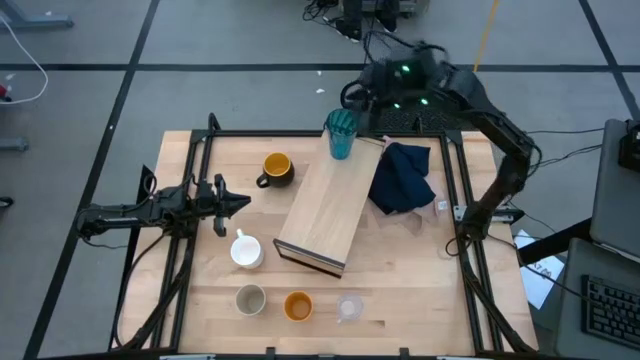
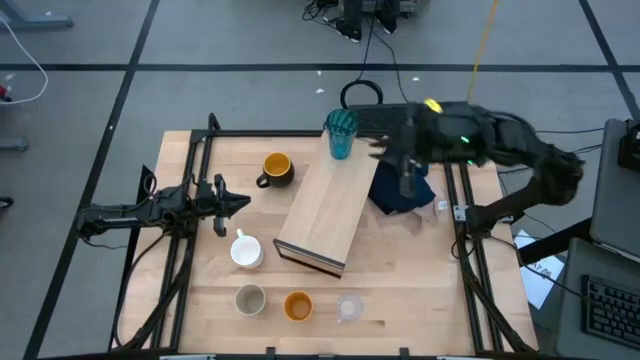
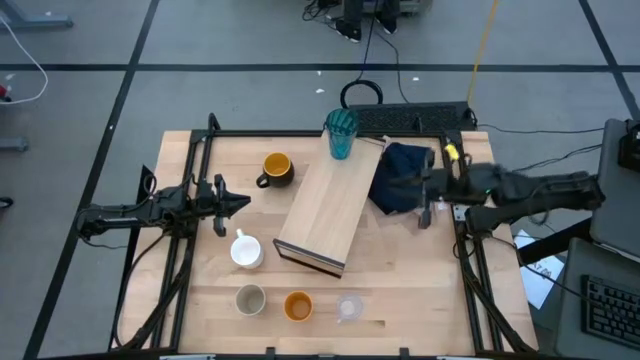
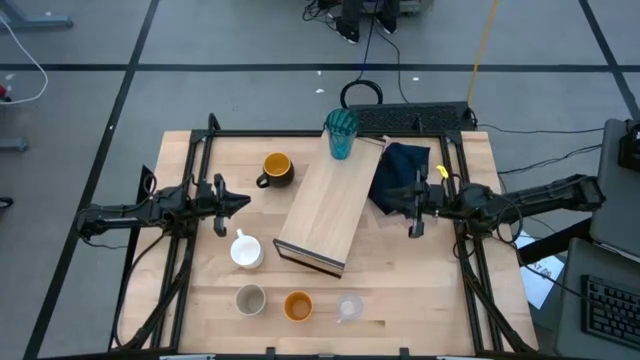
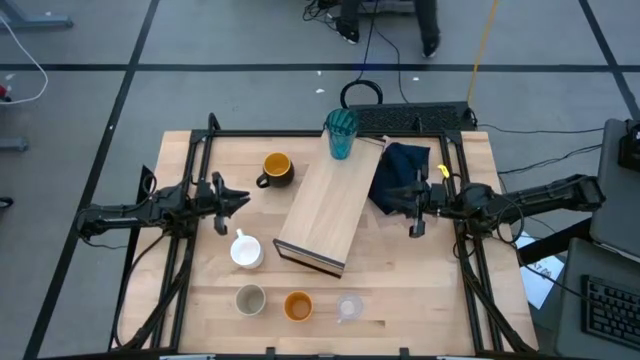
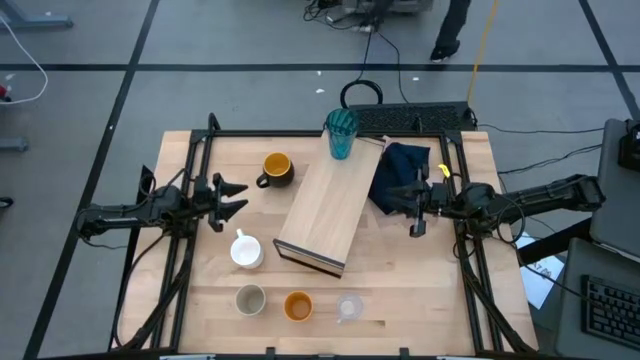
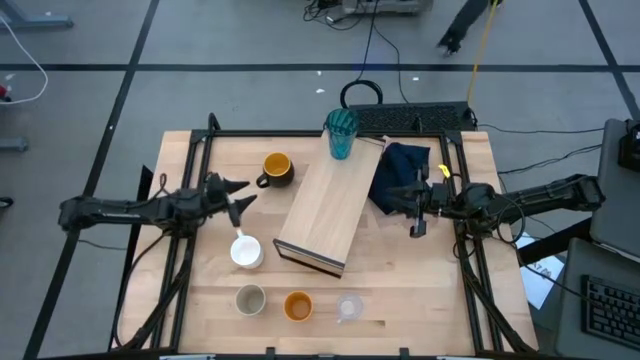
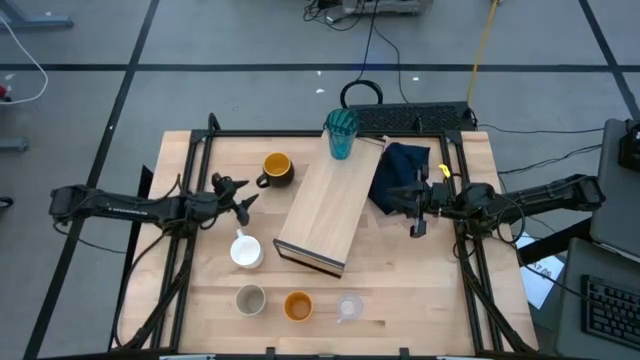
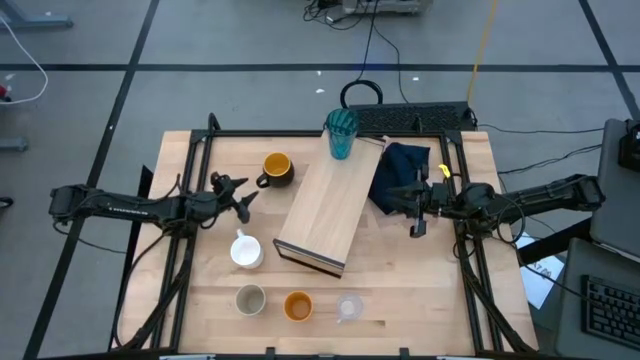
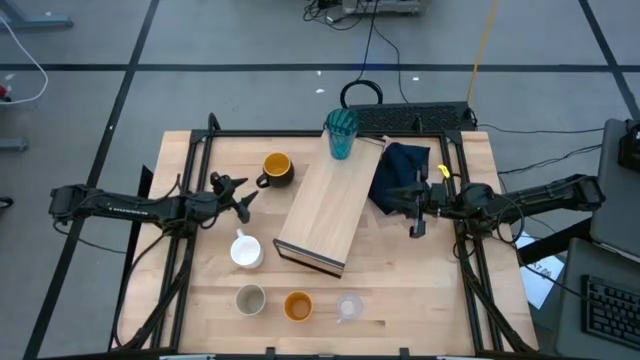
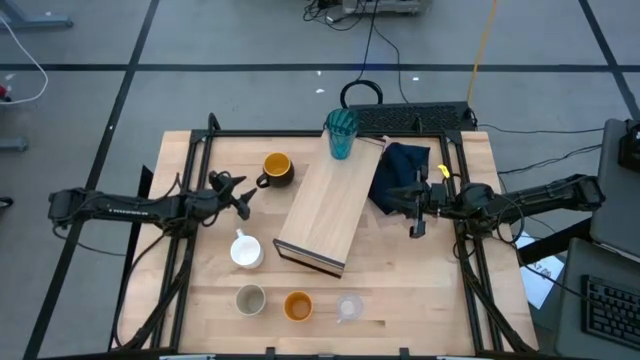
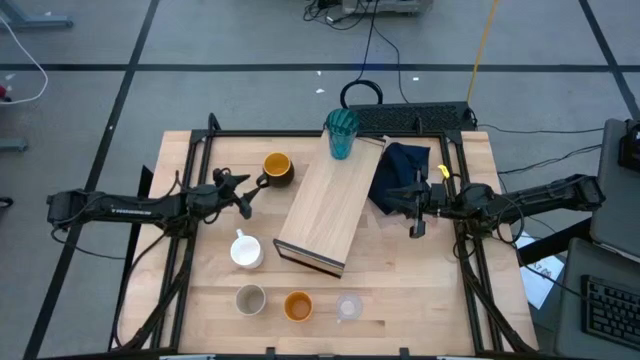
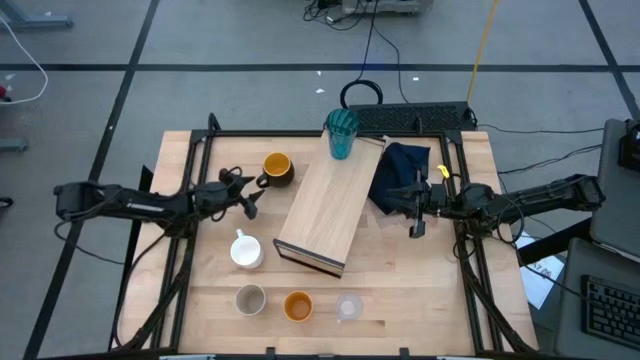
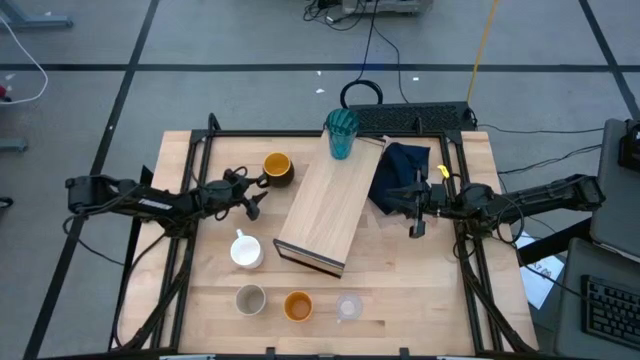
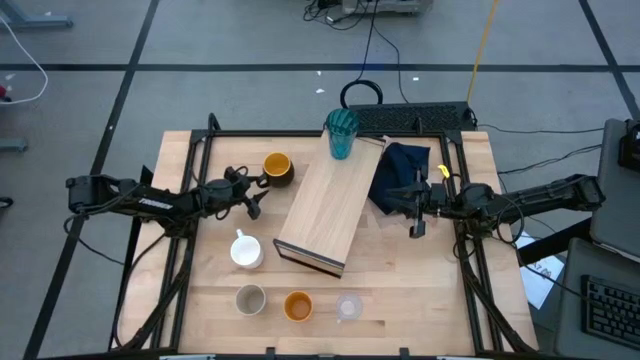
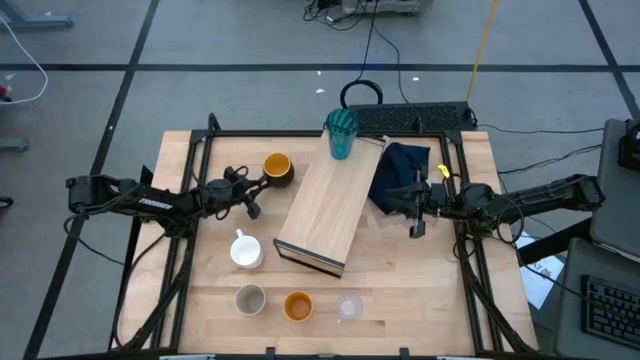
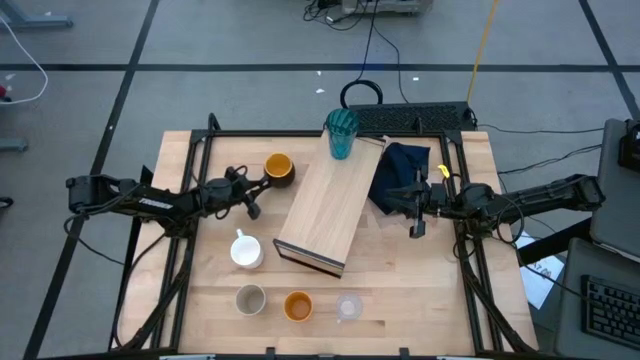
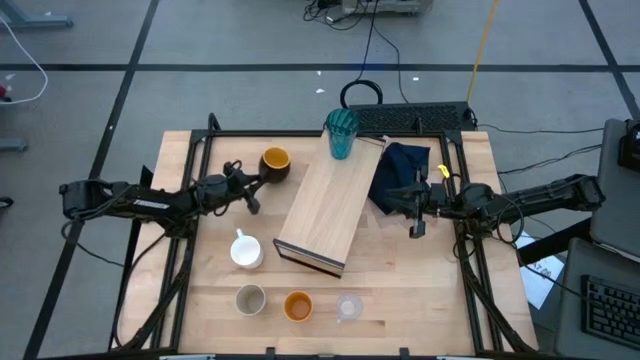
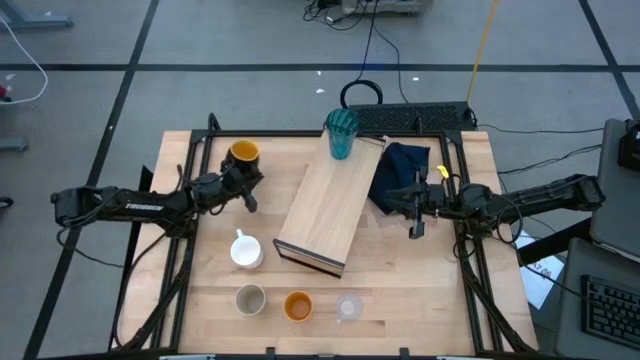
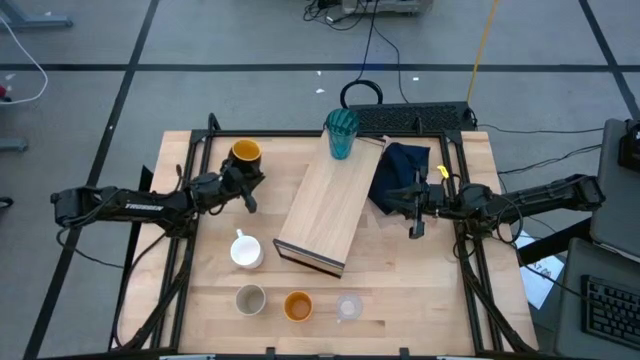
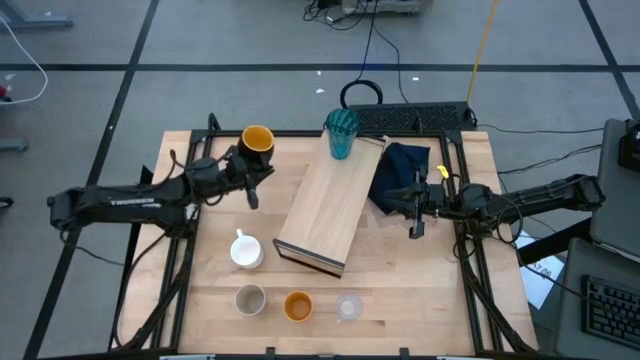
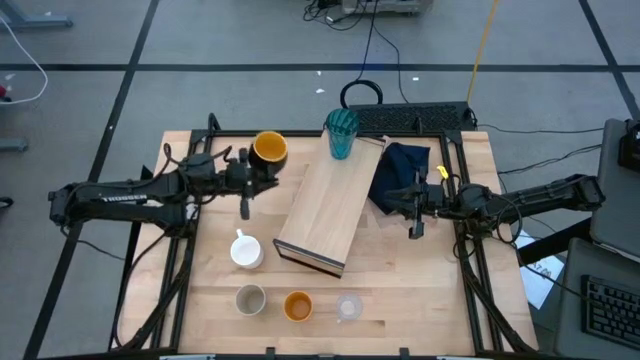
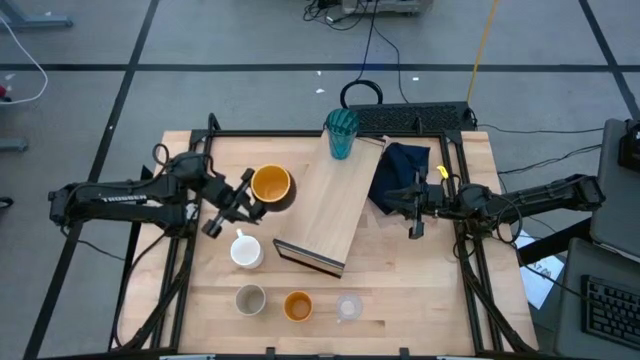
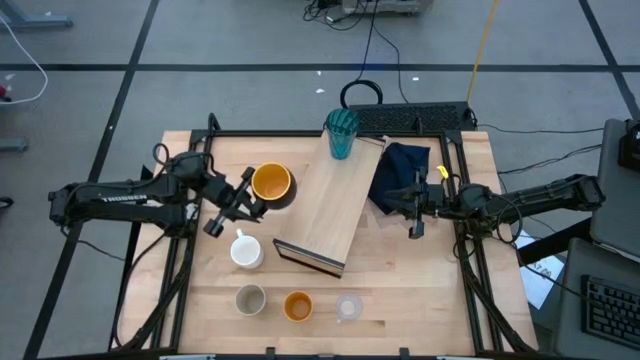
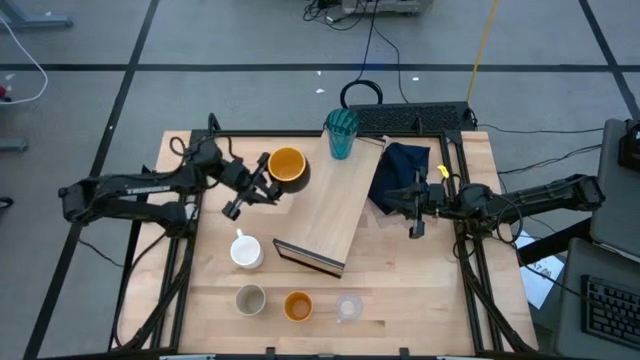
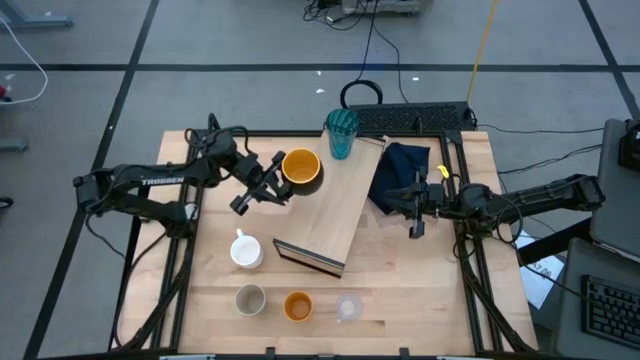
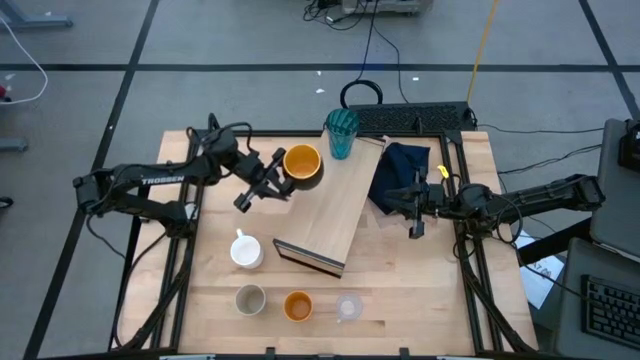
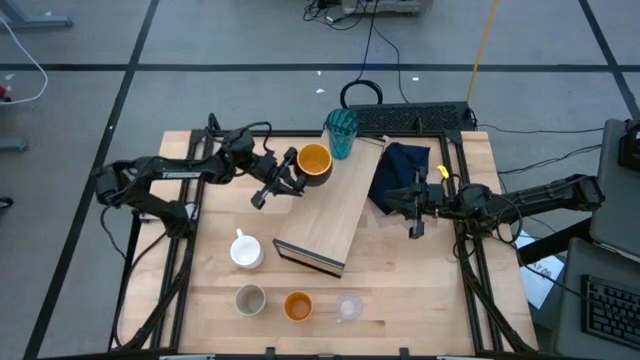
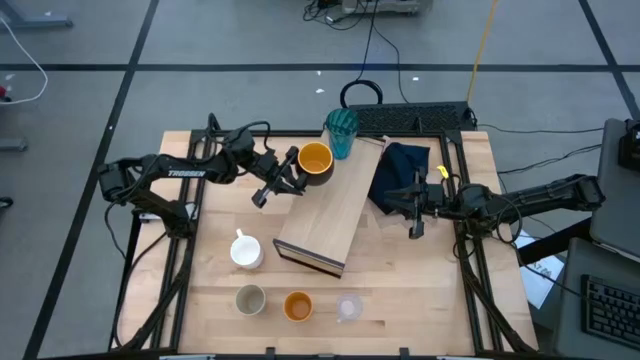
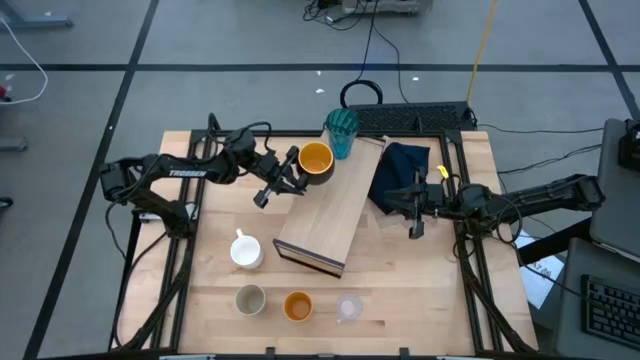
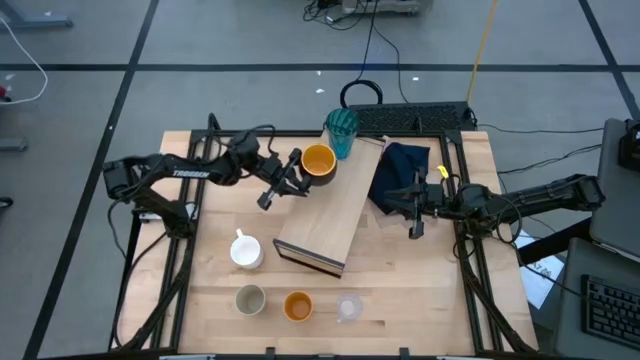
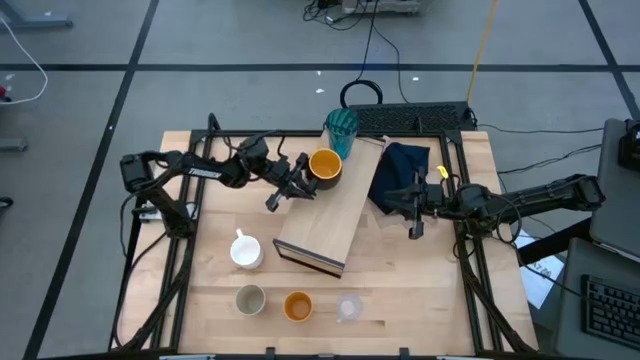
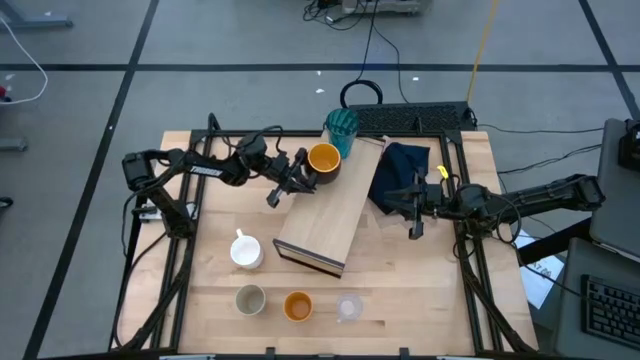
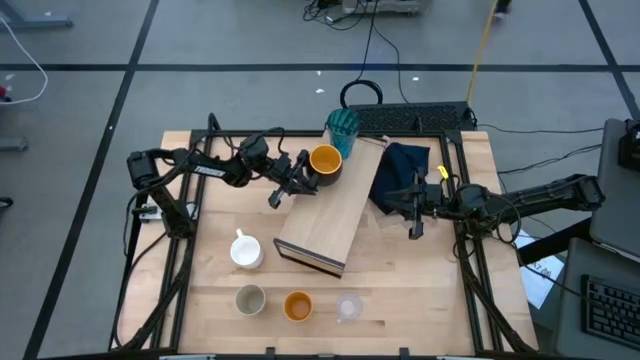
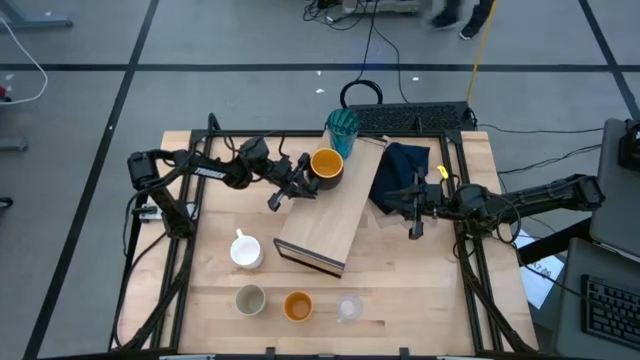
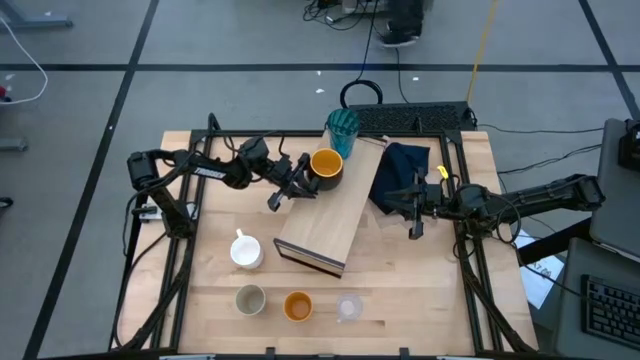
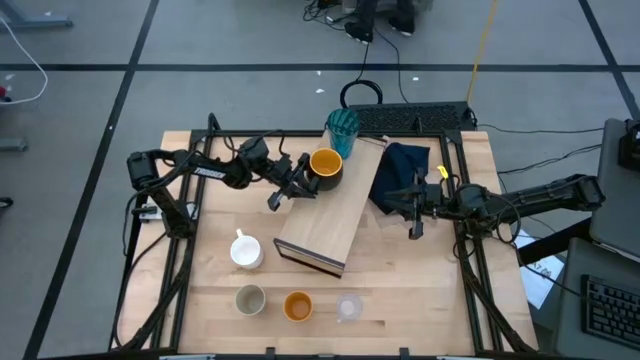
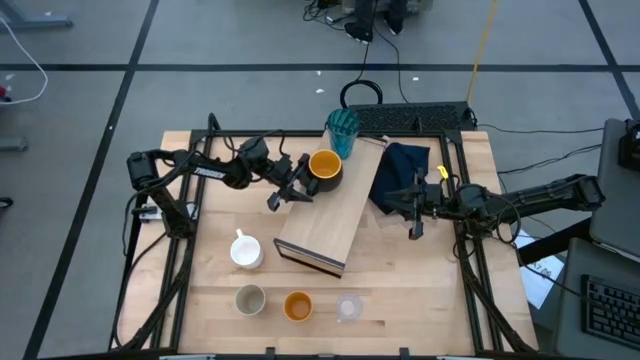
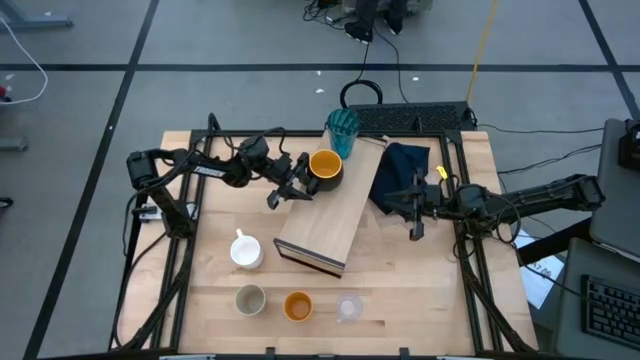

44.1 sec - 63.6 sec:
Task: Stack small to large cups/mugs on shelf
Put the black mug on the shelf

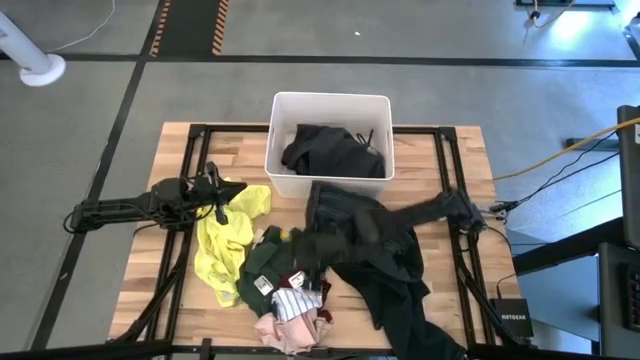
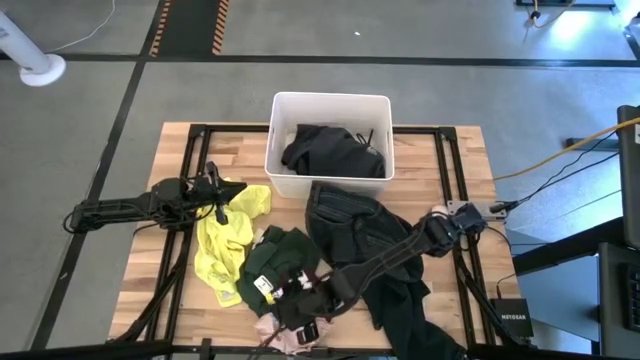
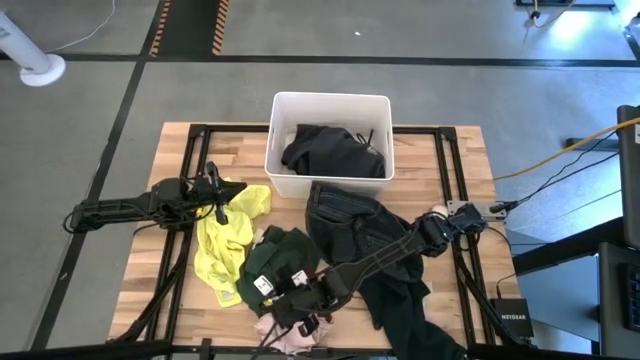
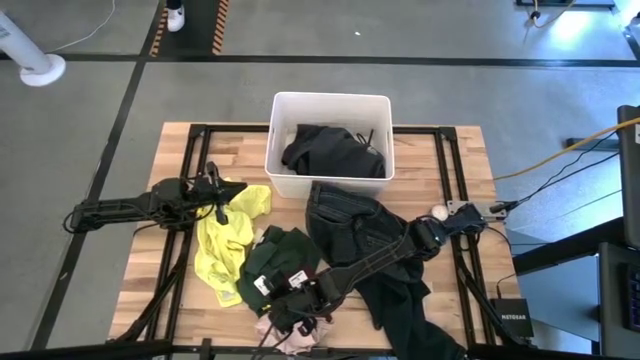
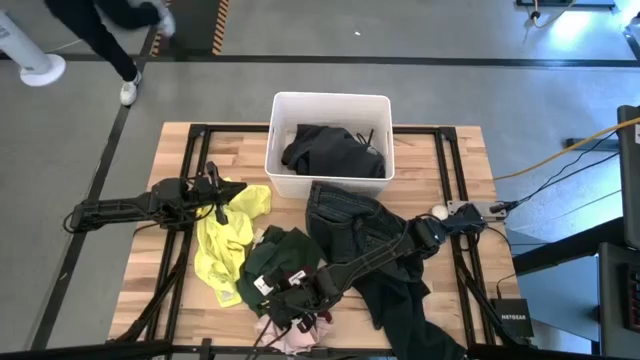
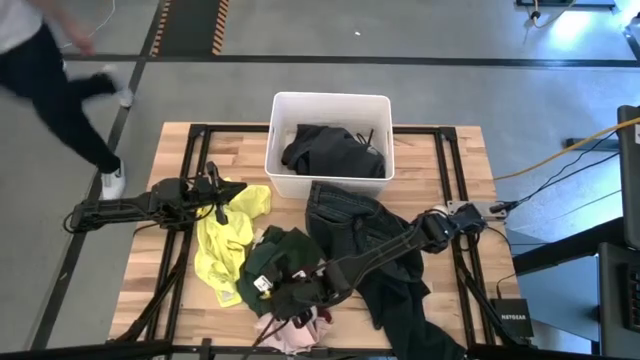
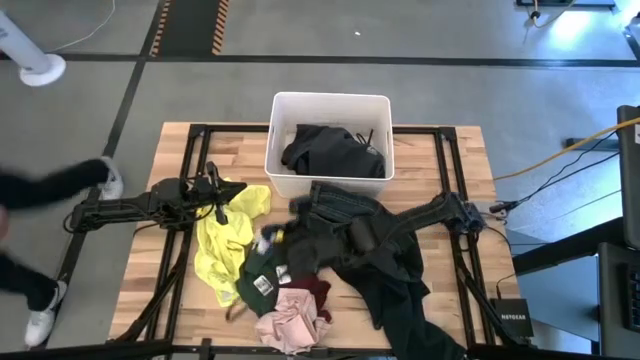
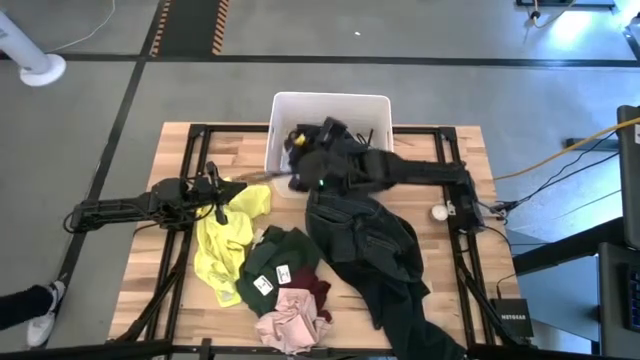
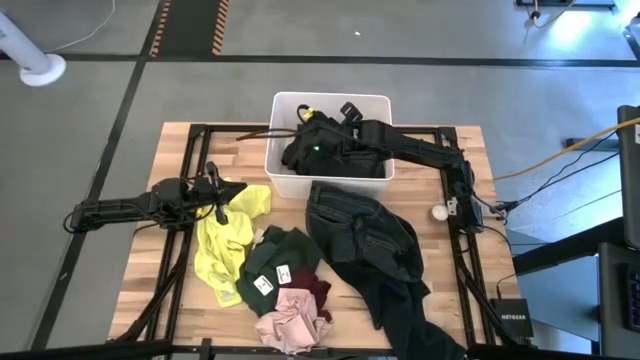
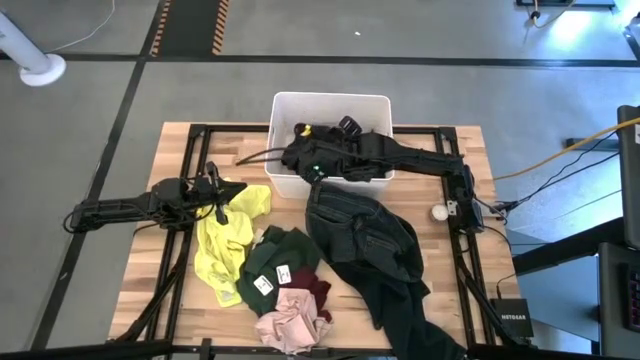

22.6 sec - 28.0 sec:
Task: Sort clothes
Put the white sock into the white laundry organizer
